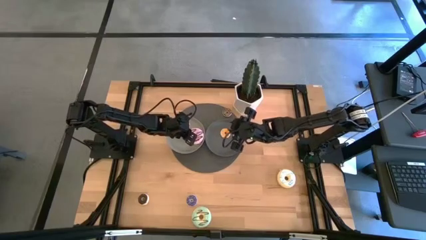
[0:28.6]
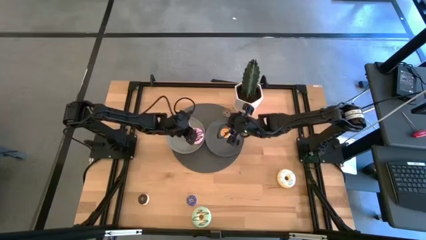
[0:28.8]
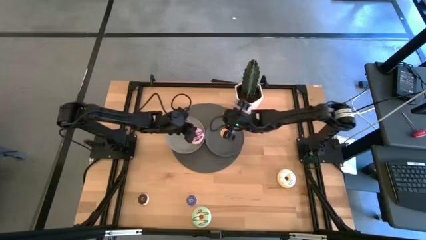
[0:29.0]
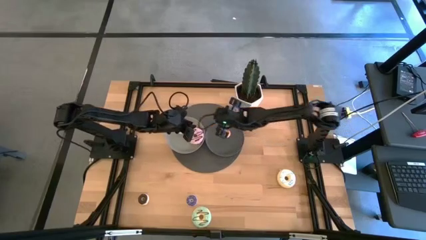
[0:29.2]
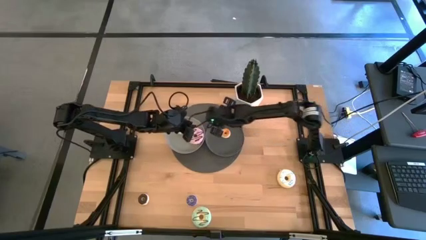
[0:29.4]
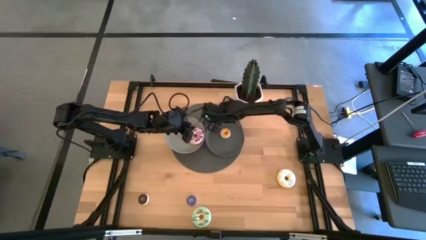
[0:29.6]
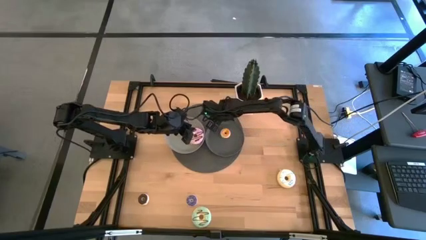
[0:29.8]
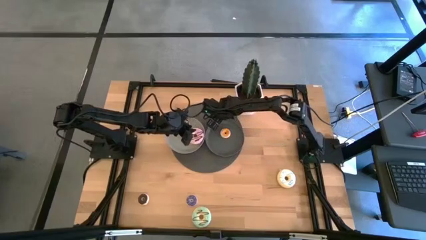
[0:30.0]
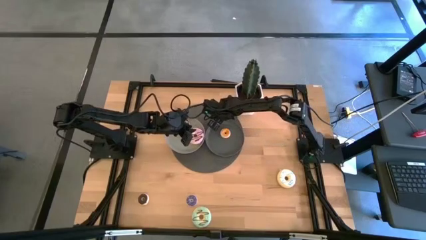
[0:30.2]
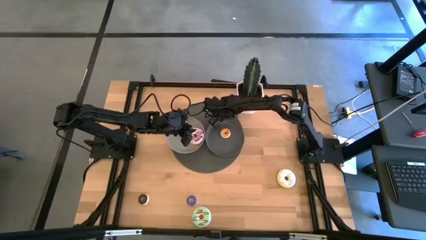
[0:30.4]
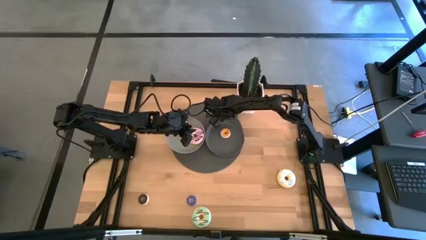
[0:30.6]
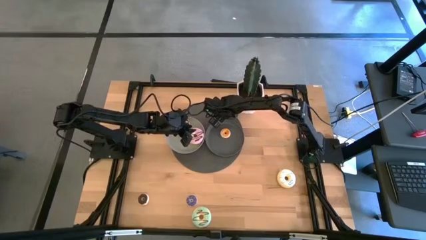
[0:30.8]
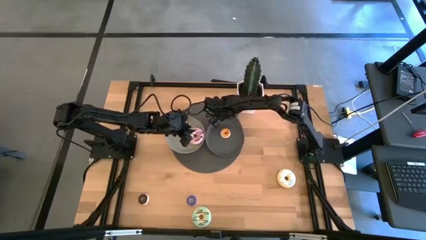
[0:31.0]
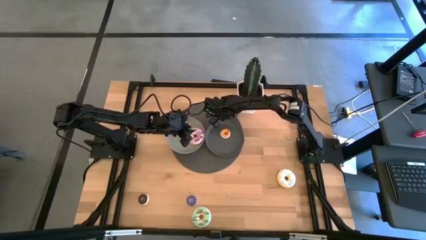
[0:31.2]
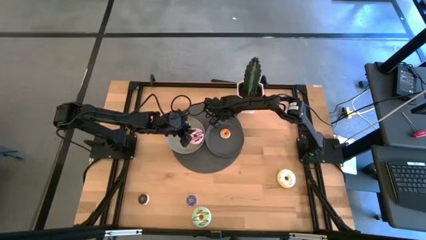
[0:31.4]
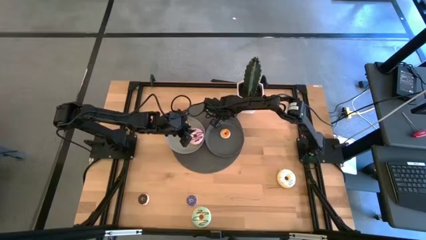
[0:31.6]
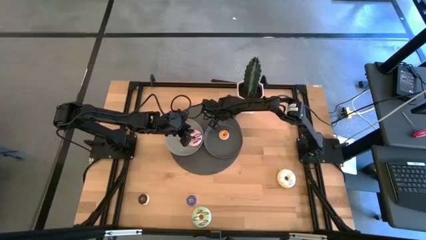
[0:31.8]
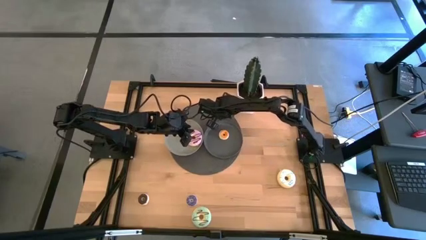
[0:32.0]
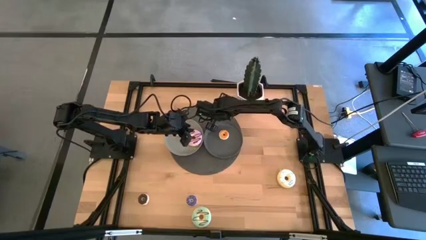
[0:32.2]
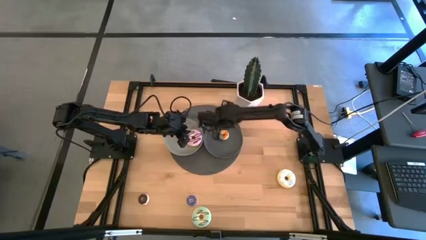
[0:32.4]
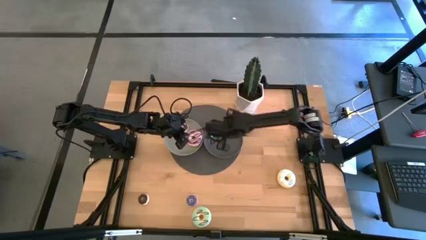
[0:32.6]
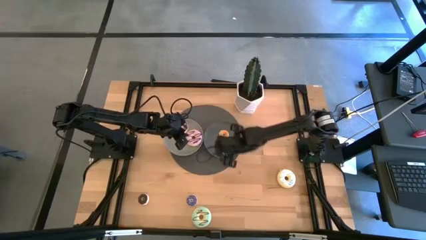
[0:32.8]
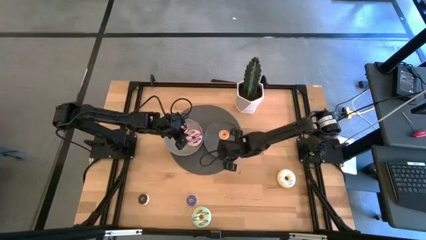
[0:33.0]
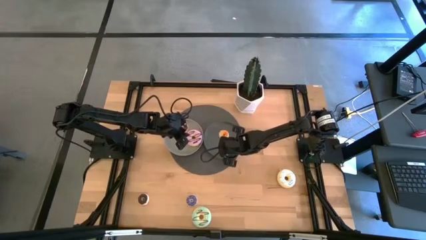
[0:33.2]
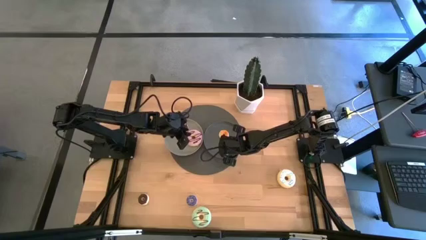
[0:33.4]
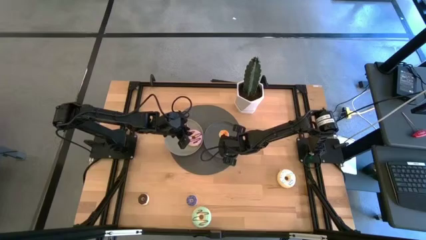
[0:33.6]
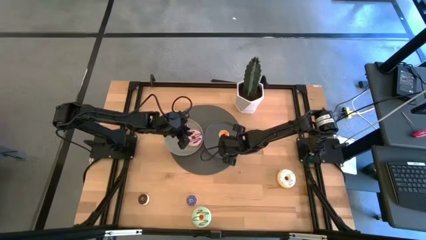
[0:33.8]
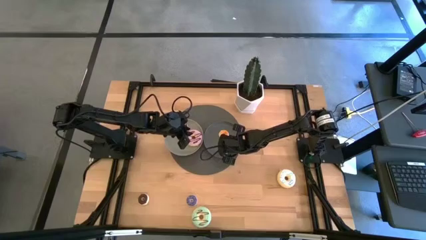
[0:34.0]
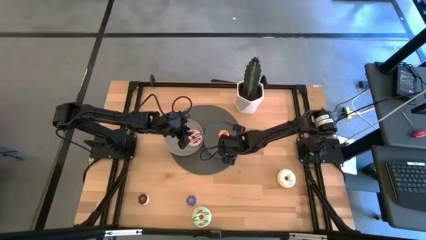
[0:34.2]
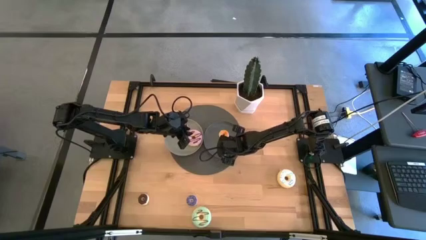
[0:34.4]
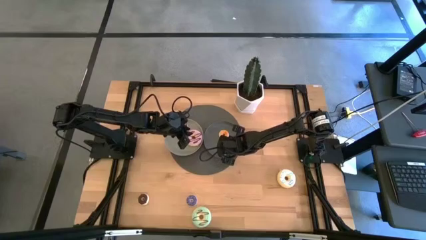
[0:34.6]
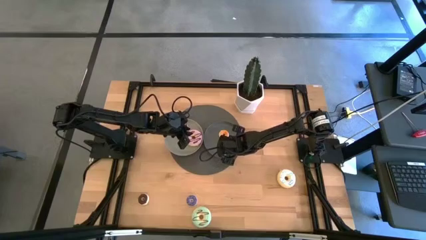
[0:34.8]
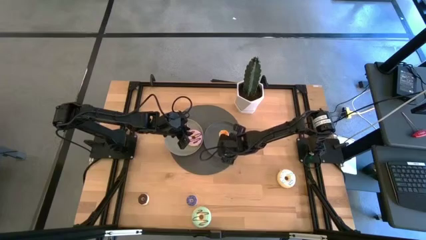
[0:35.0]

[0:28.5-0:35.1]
Task: Pick & Place donuts
Put the small brown donut on the dark gray plate

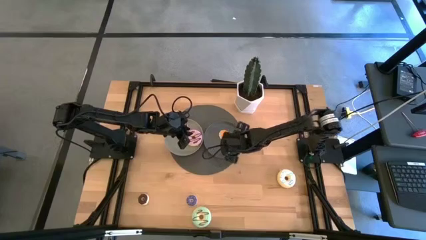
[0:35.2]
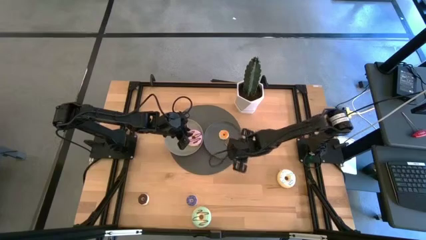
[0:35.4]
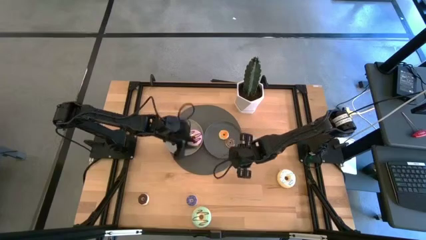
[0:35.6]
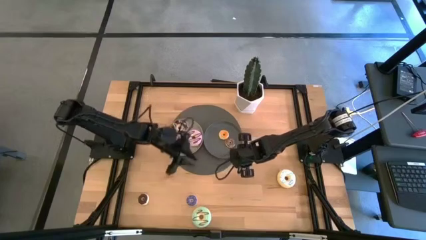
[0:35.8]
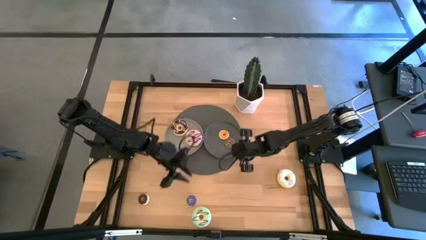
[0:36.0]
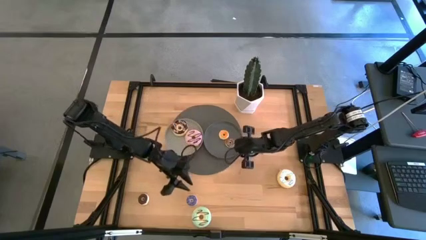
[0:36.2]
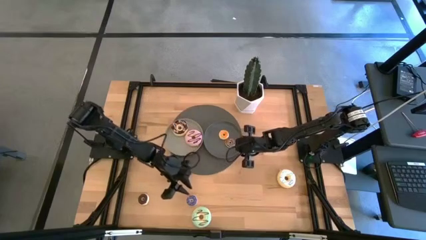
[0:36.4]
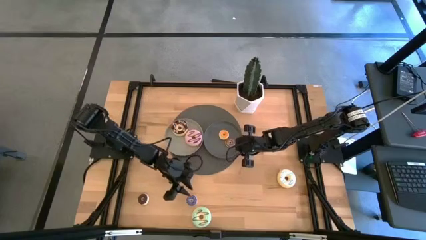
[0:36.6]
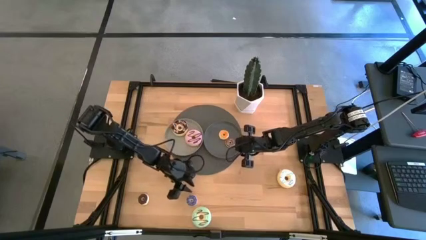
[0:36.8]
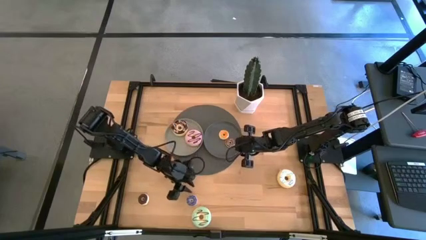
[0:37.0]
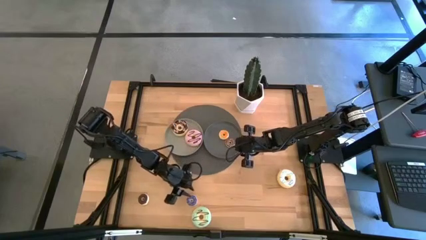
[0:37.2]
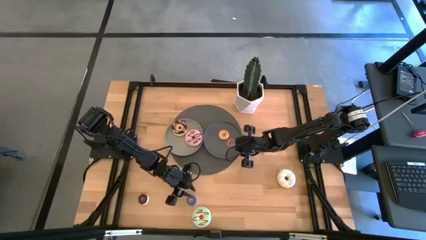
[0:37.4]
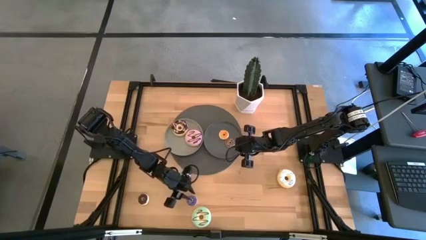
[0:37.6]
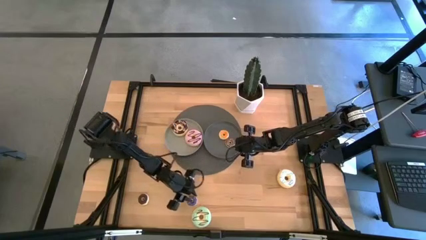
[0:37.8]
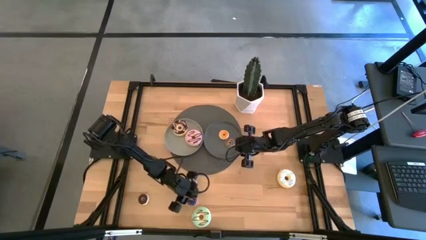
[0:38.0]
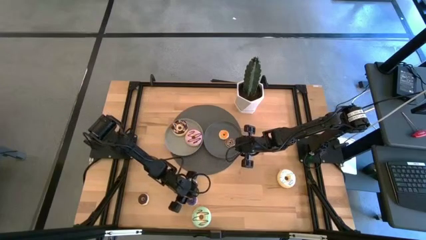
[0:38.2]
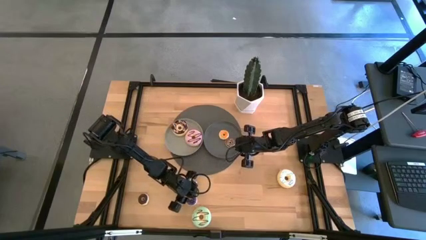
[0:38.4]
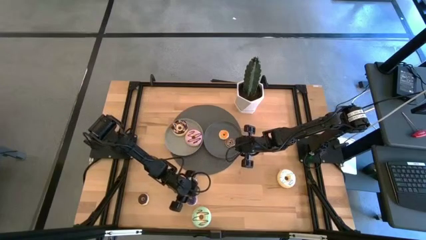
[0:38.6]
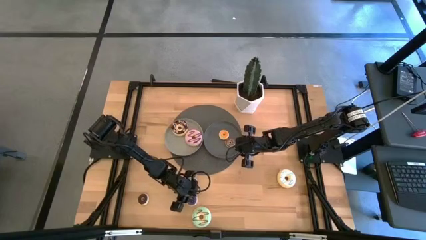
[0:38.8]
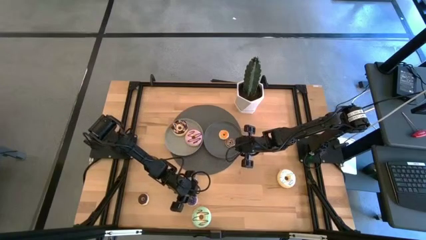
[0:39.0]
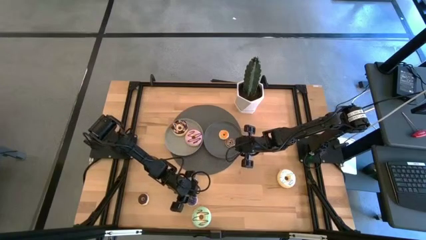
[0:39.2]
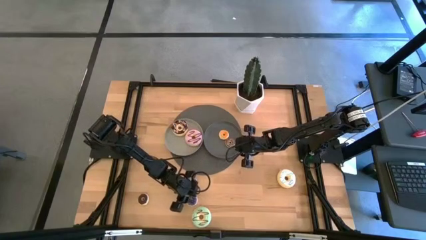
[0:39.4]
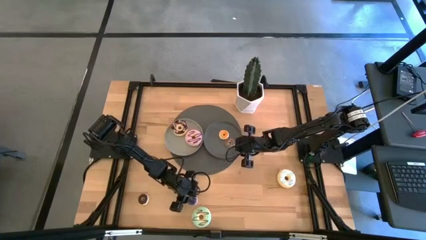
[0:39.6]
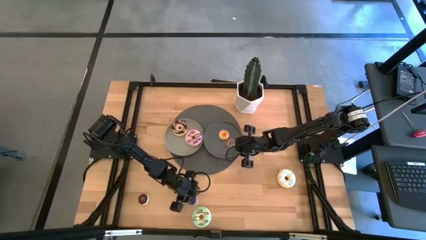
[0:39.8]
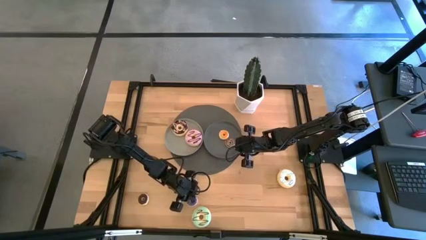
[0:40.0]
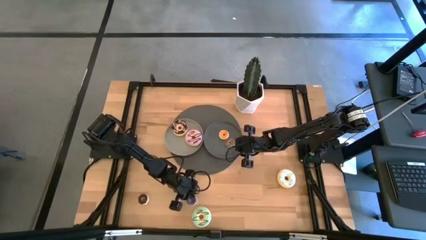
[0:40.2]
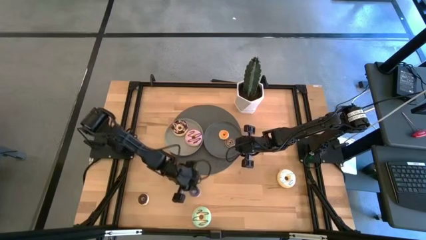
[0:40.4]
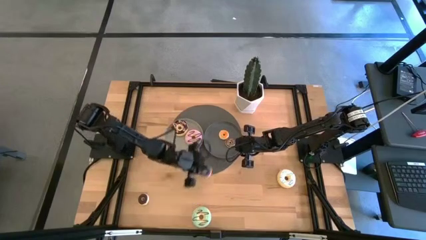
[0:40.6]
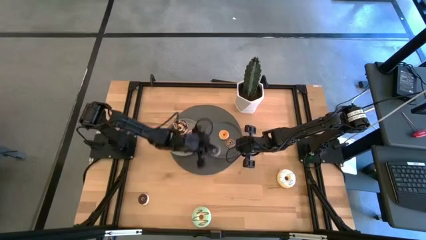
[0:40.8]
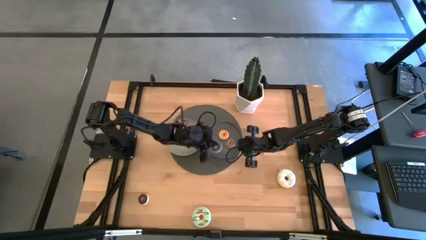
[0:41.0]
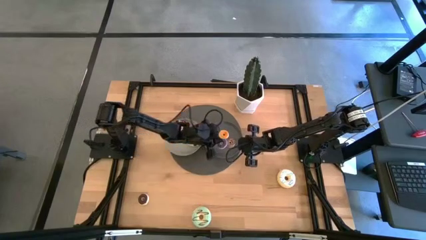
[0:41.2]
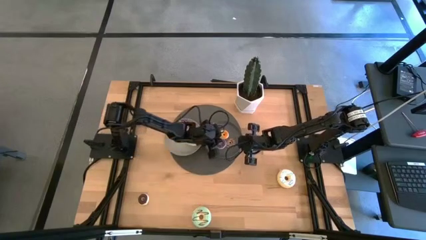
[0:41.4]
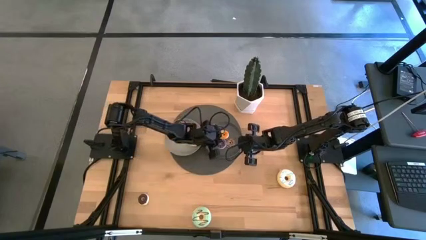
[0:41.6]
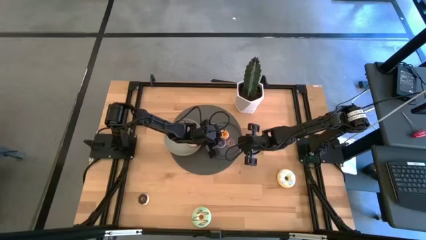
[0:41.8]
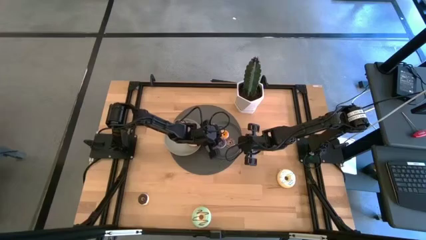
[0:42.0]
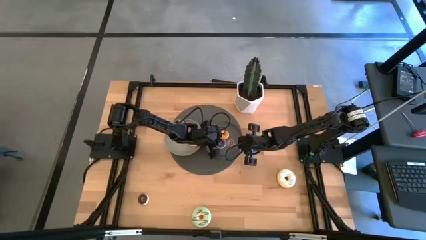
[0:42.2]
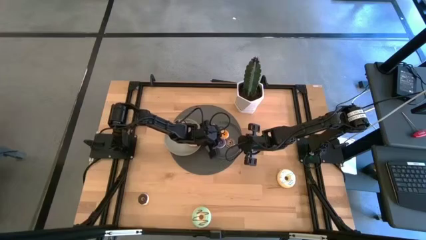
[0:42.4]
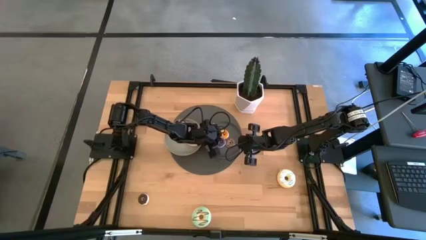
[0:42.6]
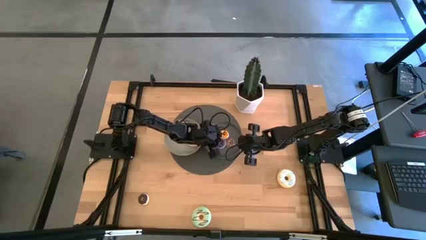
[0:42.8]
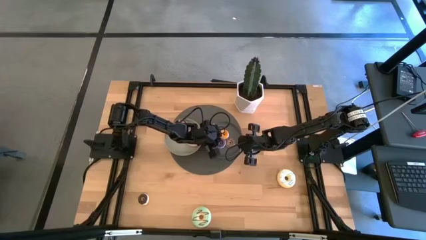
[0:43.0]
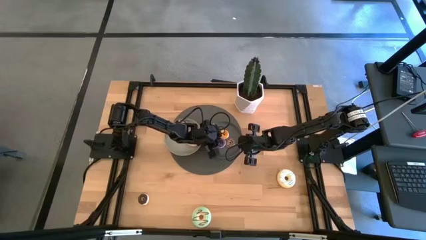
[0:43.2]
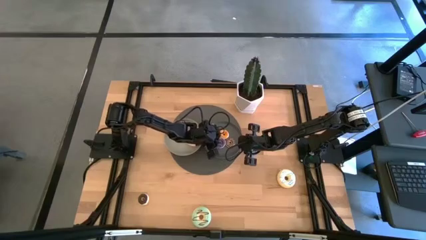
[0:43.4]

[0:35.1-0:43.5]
Put the small dark blue donut on the dark gray plate

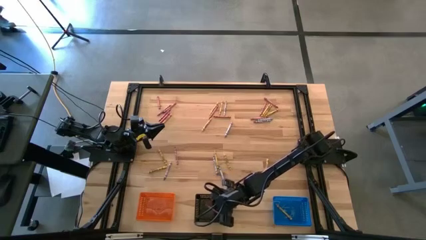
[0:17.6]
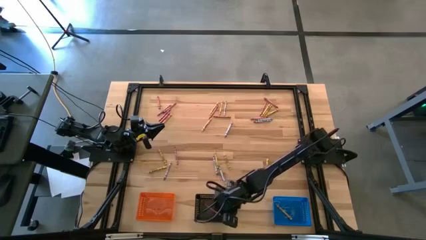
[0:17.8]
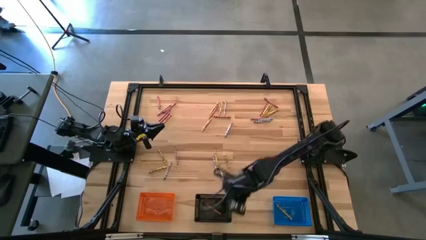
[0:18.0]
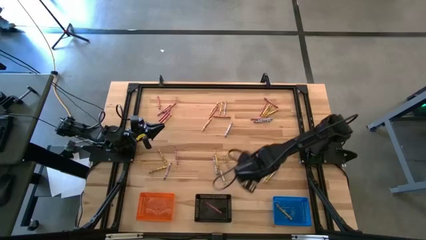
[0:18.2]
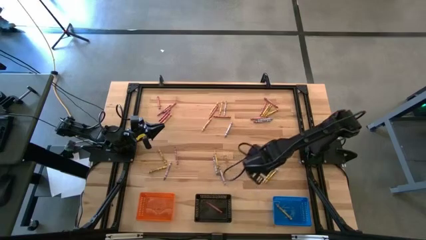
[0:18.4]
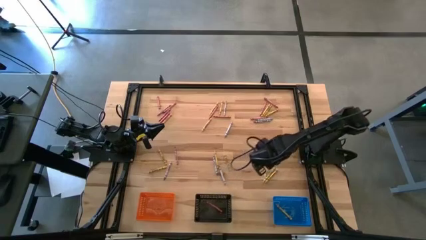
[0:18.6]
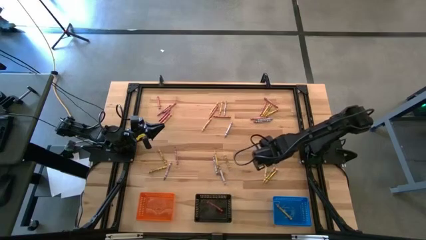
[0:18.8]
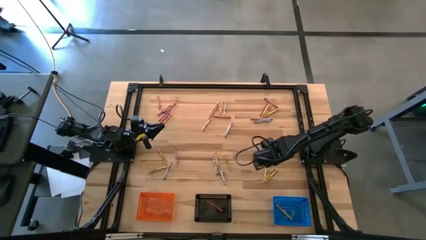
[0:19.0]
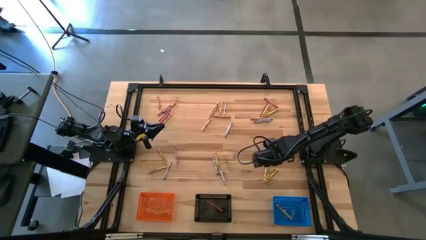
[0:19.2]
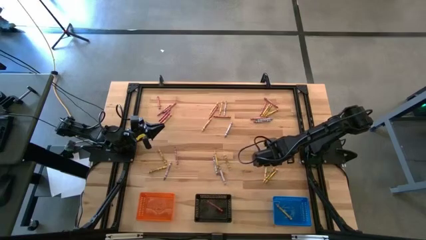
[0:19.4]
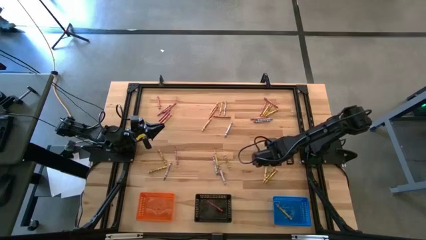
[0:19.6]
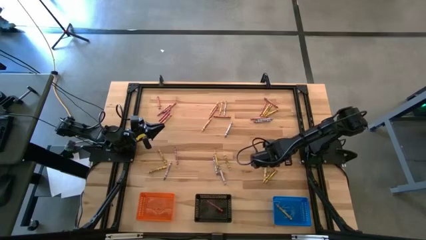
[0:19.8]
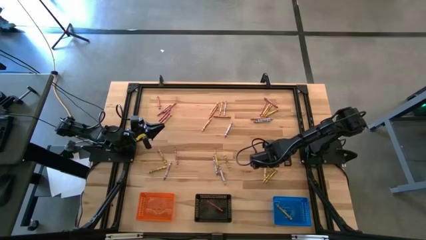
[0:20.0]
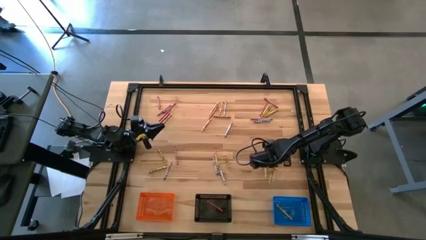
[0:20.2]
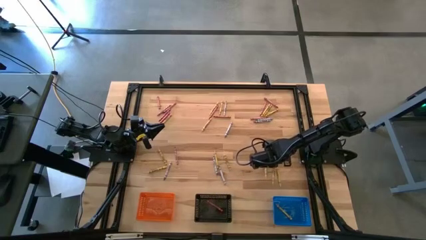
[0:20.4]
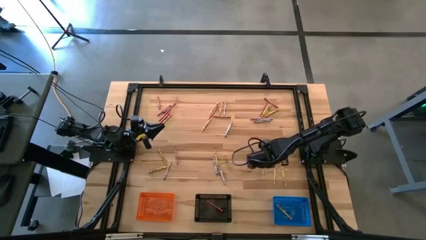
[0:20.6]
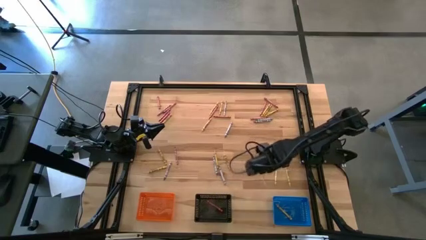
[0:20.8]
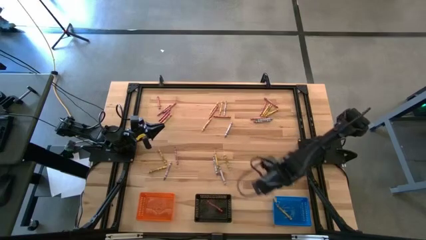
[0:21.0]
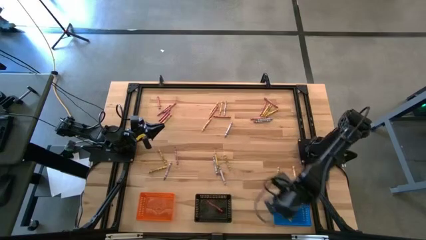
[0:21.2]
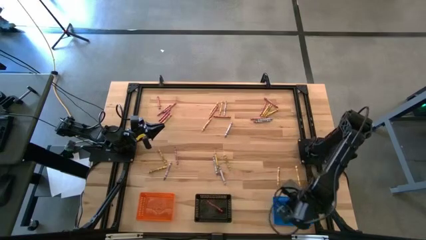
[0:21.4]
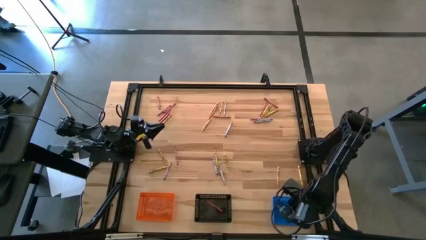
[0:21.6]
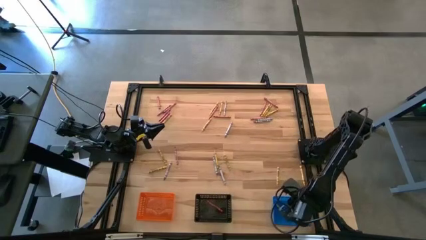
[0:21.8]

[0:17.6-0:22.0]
Task: Sort crayons
Put the yellow crayon into the blue bin
